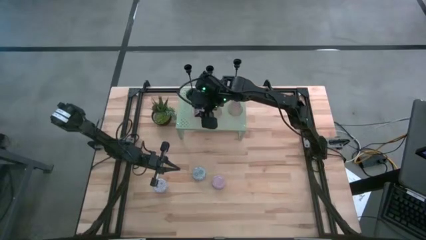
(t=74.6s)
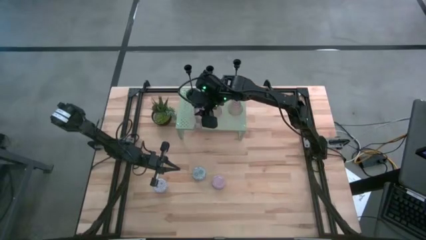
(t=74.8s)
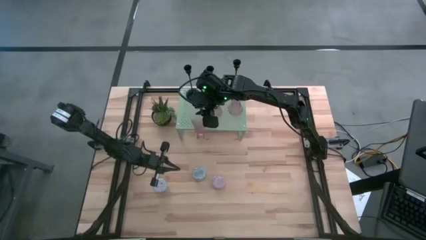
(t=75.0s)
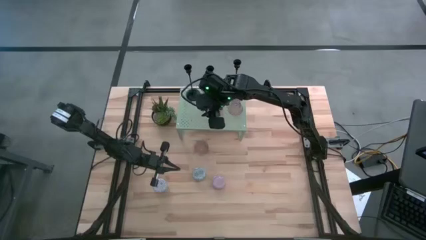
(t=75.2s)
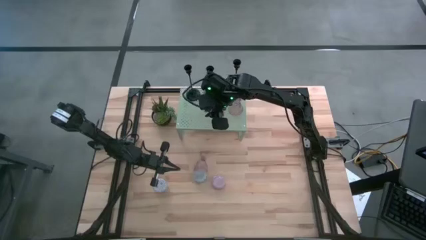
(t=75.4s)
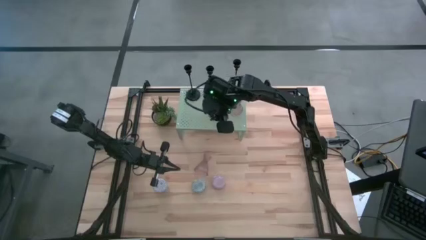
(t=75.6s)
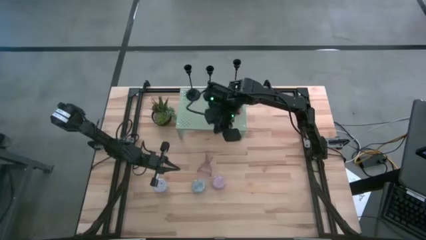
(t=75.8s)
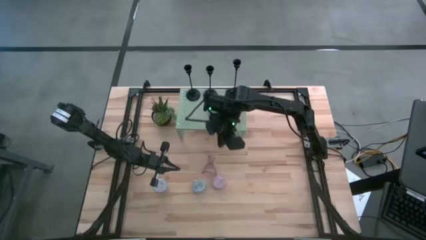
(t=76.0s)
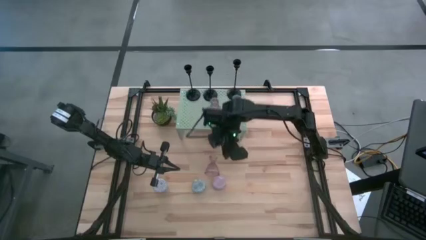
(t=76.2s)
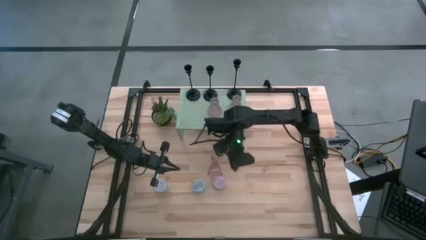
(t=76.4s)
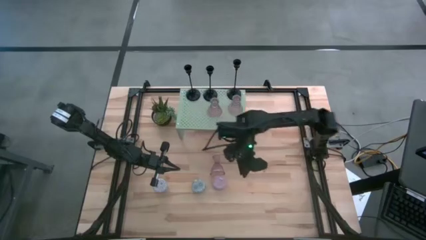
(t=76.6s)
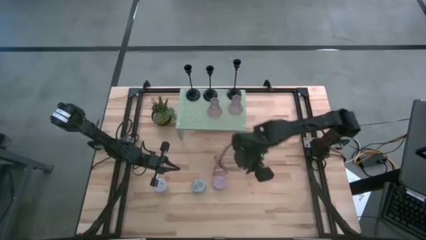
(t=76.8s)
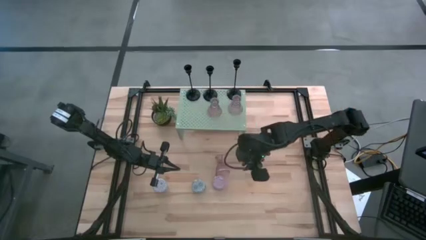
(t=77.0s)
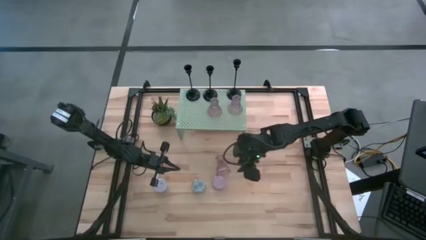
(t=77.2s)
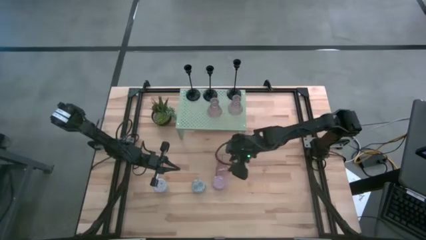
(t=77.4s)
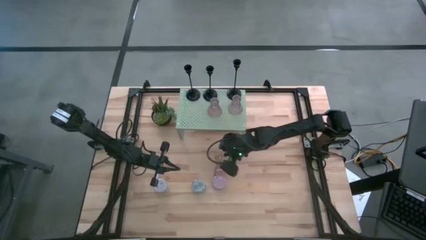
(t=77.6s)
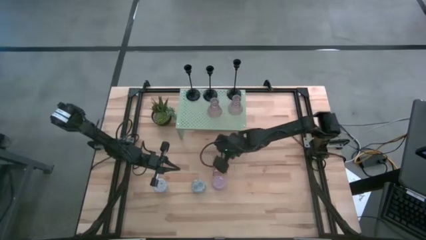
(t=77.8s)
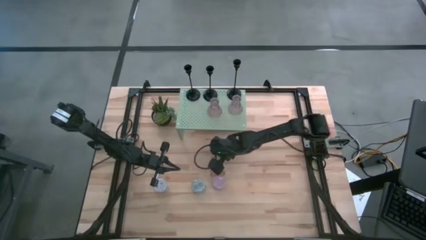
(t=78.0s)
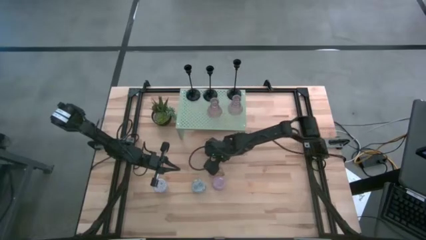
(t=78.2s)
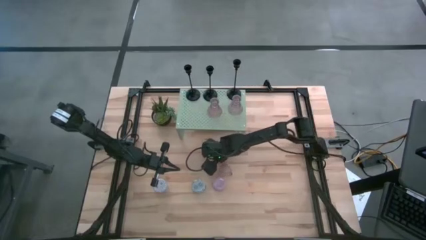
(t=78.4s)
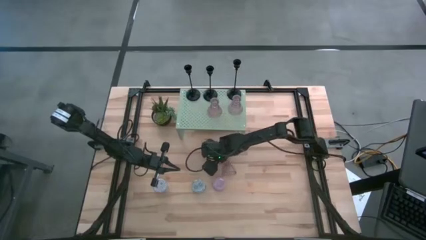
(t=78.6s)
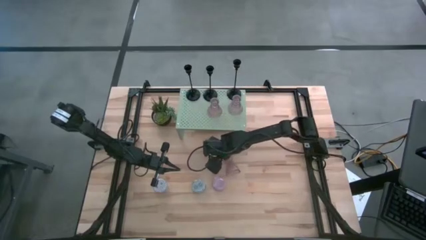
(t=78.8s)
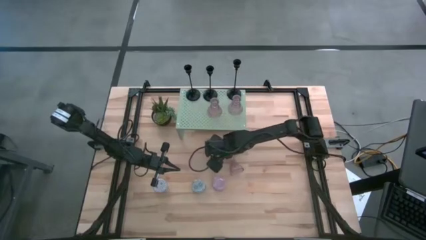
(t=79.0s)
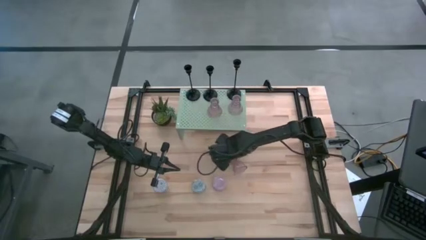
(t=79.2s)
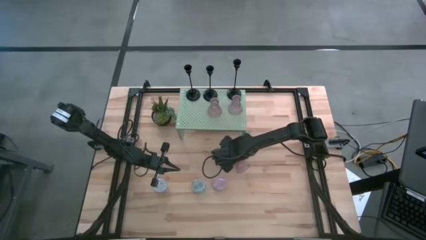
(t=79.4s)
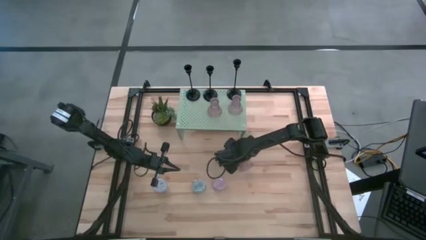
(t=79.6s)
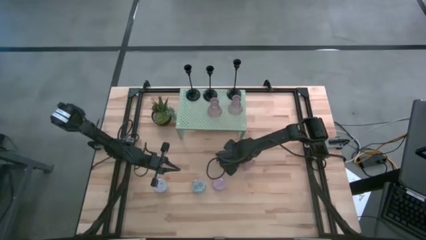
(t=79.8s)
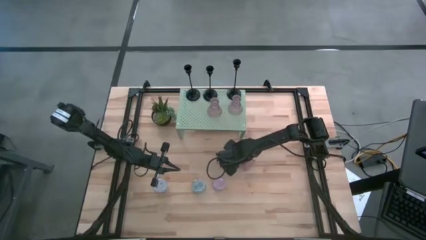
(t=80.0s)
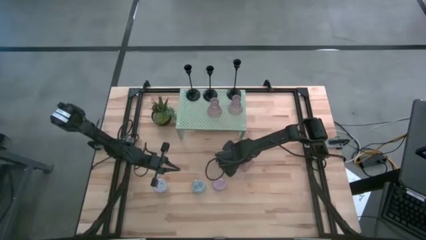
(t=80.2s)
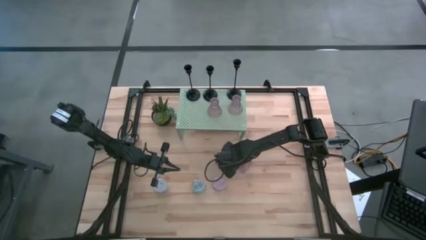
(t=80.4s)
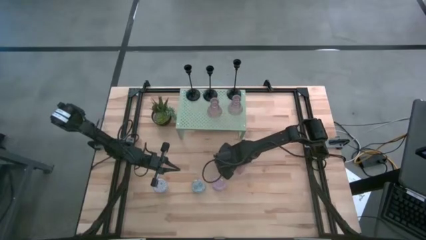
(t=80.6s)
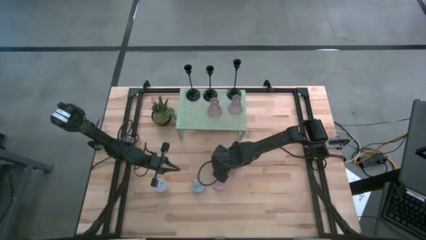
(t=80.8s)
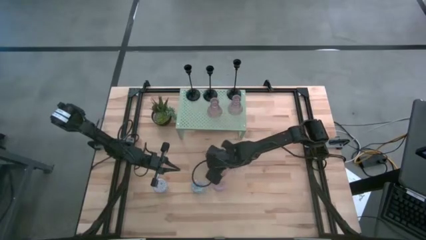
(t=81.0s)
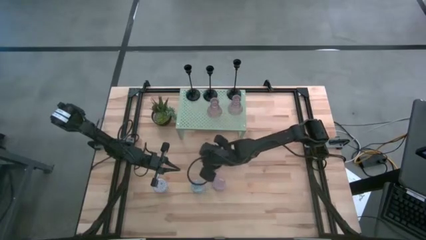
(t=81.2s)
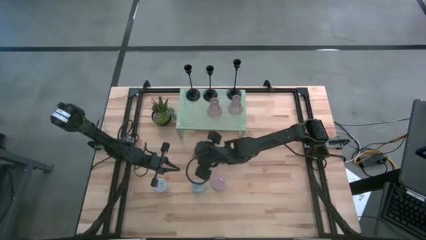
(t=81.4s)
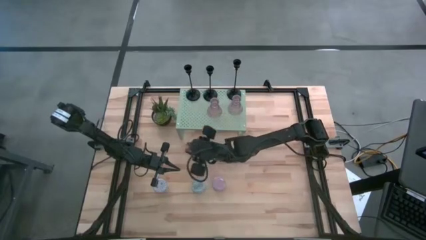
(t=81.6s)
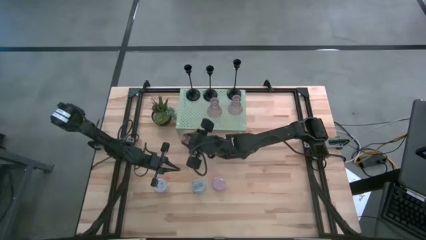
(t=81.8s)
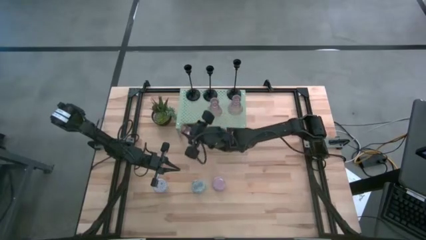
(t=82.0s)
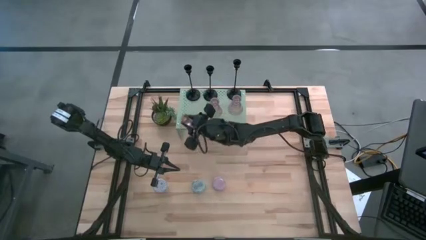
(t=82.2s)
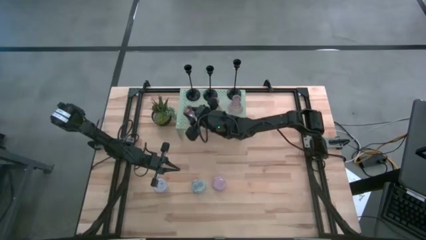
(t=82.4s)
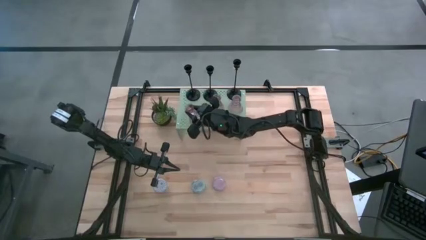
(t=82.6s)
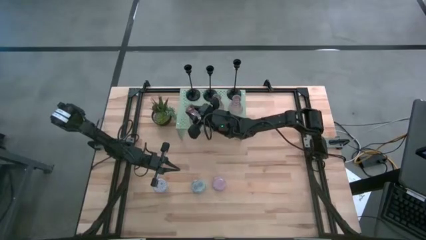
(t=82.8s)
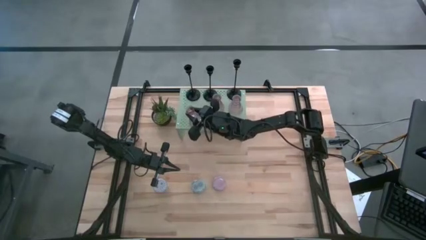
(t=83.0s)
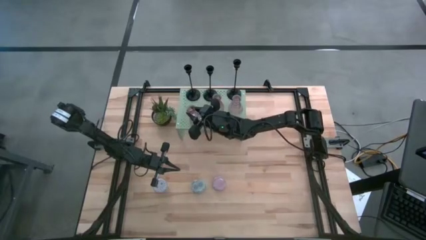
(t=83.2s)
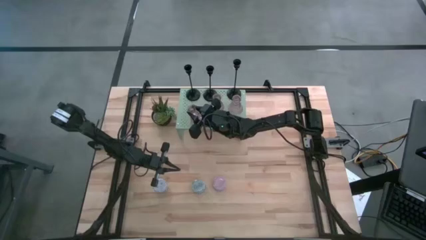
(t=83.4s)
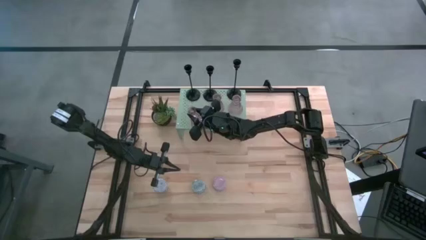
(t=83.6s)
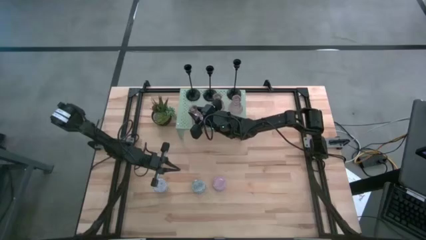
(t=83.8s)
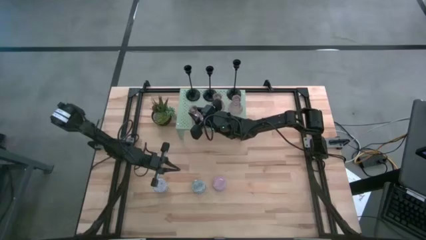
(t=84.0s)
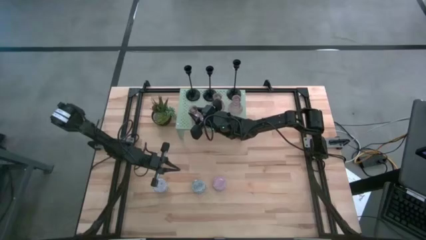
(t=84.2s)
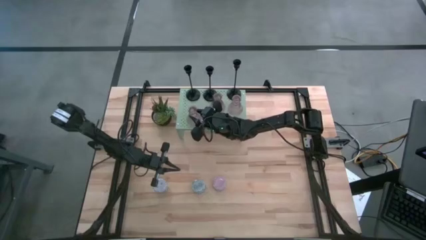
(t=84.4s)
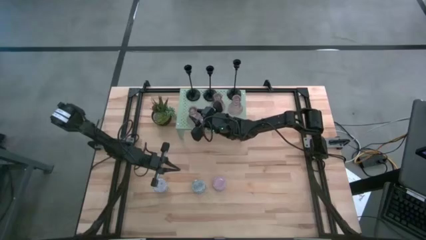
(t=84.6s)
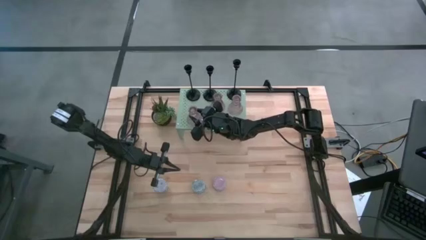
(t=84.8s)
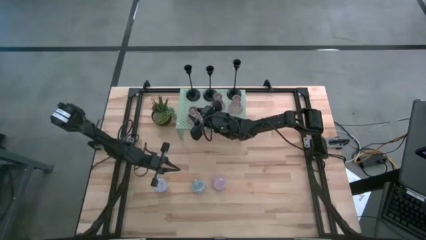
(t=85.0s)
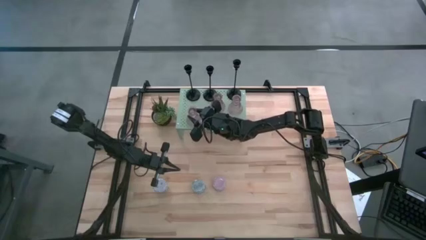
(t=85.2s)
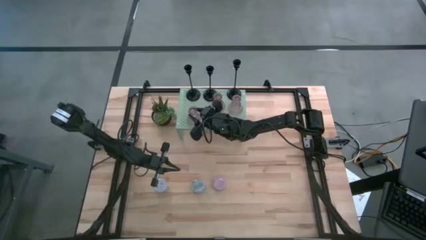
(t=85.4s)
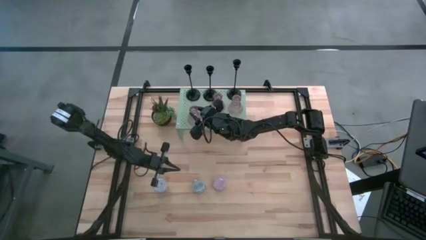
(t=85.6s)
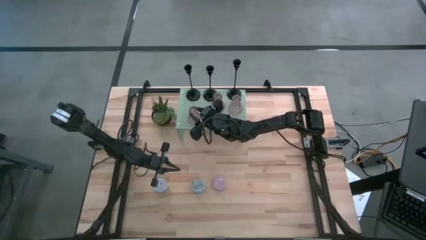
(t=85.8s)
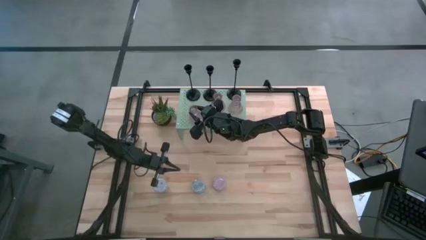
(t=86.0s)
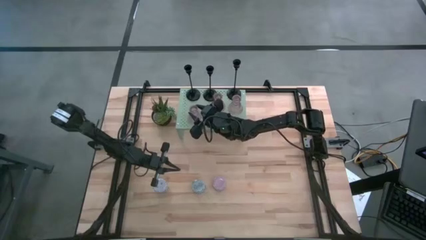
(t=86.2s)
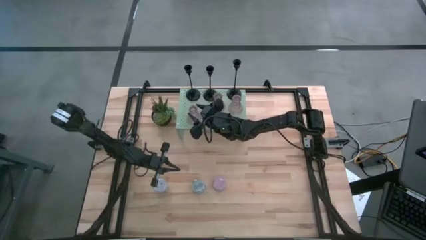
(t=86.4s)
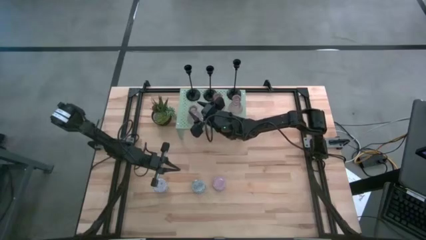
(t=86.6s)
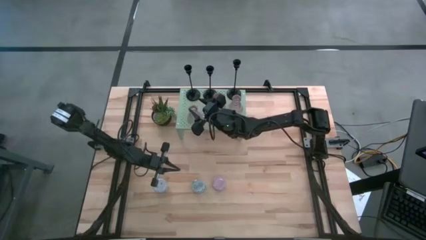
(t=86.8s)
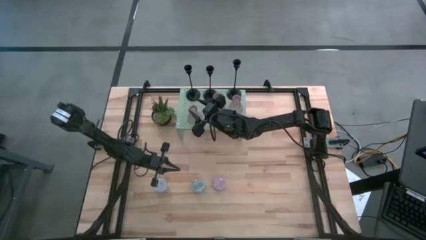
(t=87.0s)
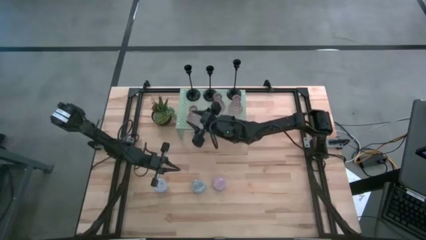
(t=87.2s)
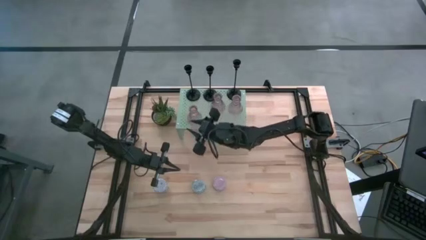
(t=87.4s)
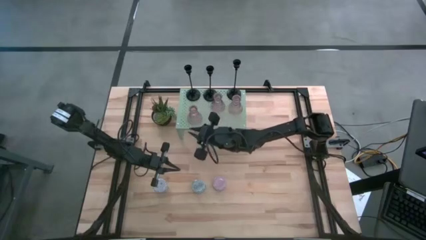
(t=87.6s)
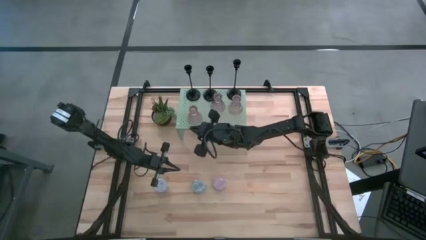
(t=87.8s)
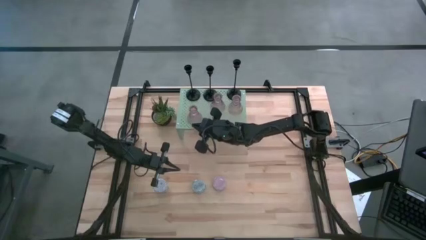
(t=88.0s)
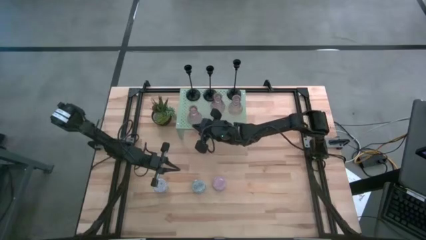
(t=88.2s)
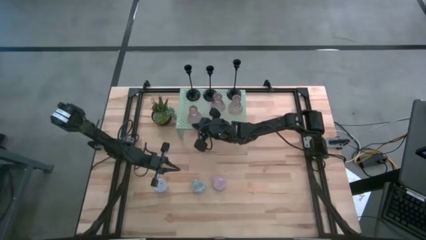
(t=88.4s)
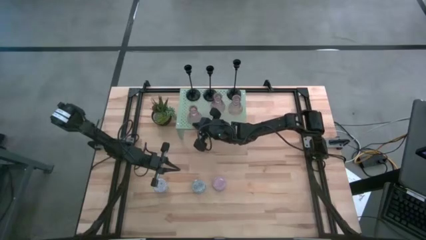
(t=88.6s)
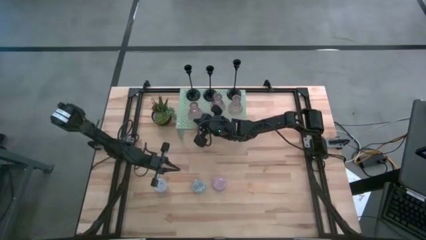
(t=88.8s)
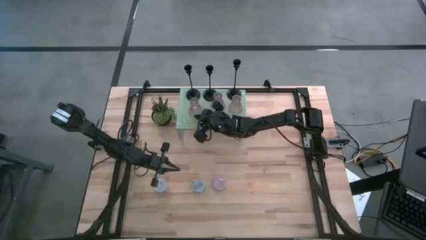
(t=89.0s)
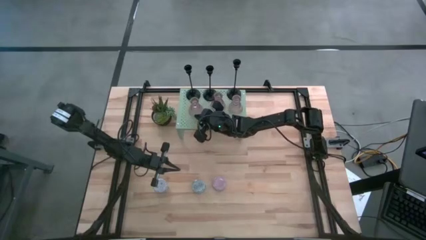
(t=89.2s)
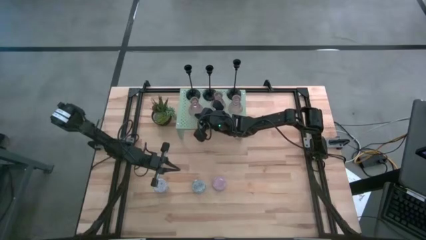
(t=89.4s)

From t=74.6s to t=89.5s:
Task: Pick & Place candle stick holders
Put the transparent pink candle holder on the shelf aligned with the black candle holder
